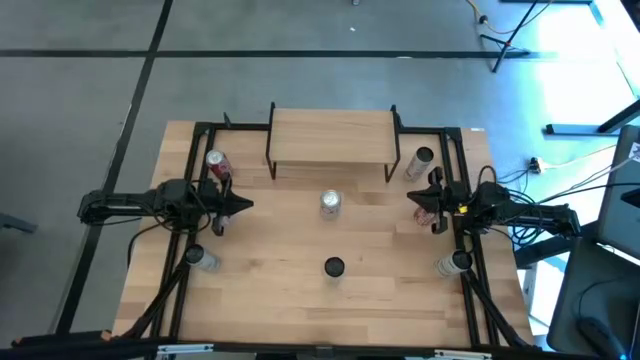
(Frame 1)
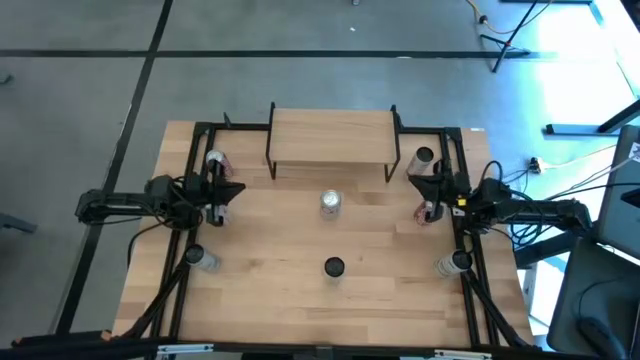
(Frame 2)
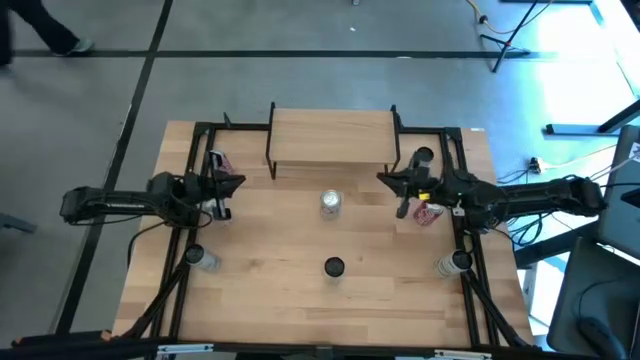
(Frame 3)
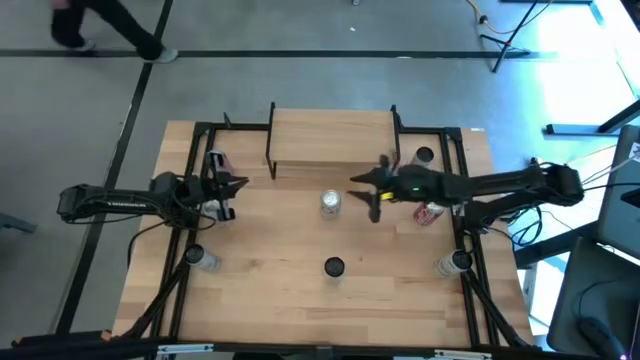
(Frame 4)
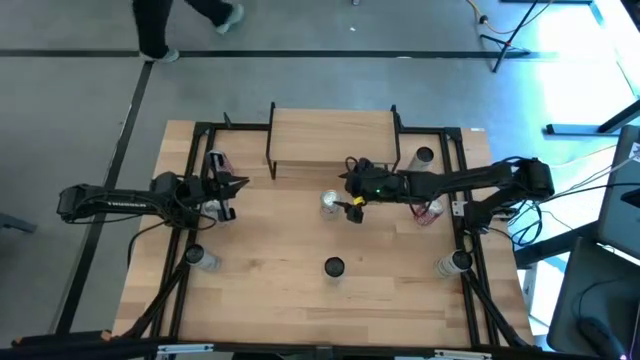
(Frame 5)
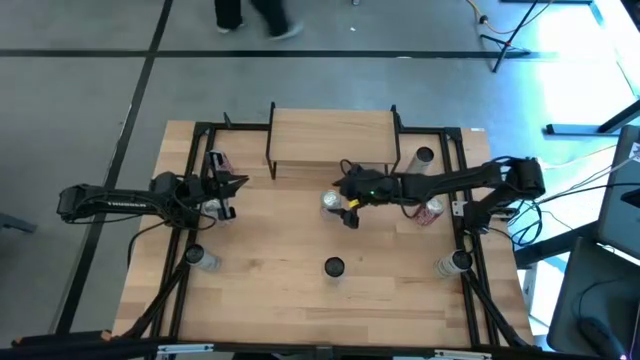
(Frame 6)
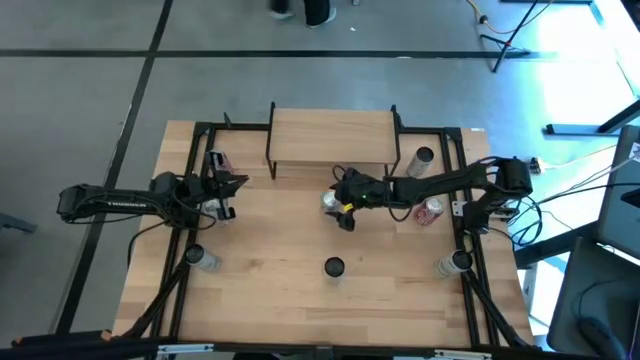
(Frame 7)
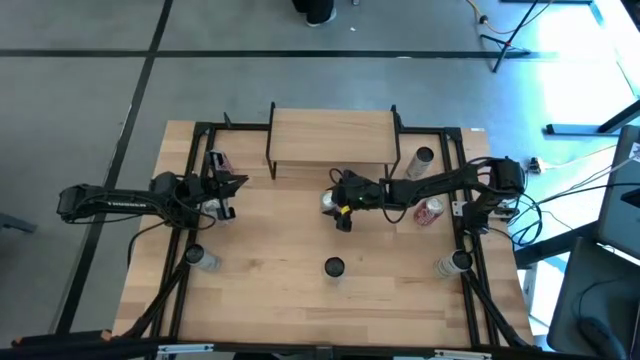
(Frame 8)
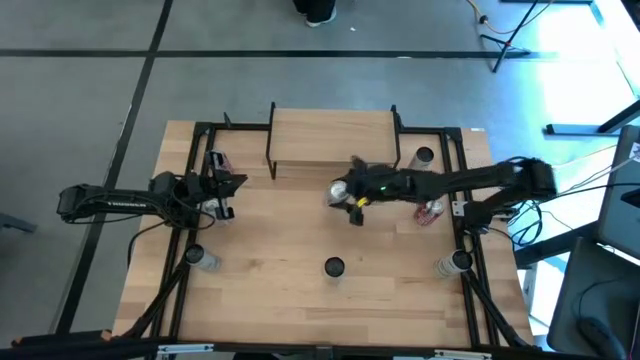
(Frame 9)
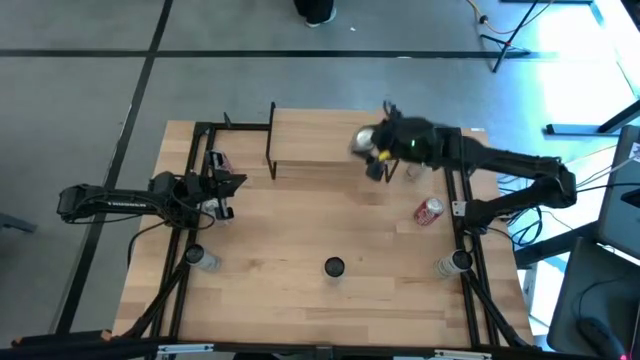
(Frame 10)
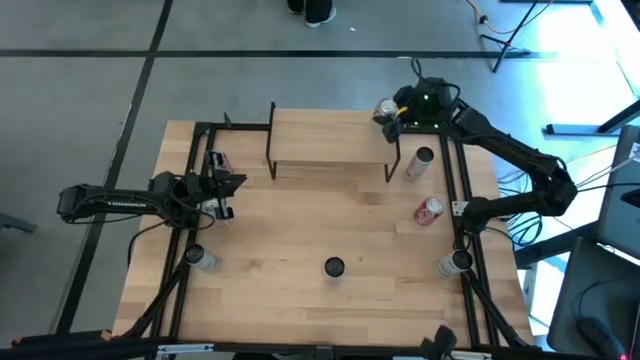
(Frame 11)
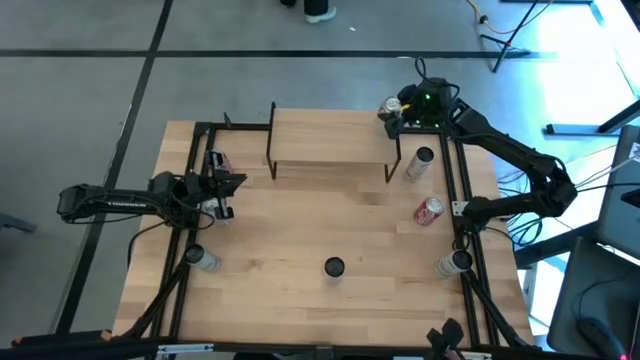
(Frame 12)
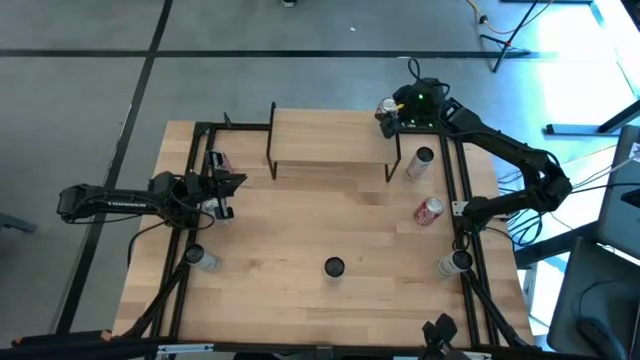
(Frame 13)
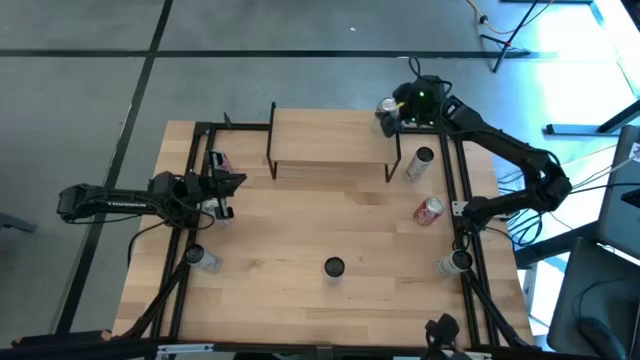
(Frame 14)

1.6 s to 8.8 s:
Task: Place canned beverage on shelf
Put the right red-silver soda can on the shelf

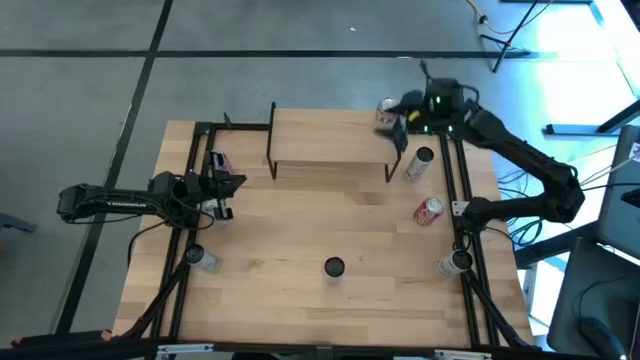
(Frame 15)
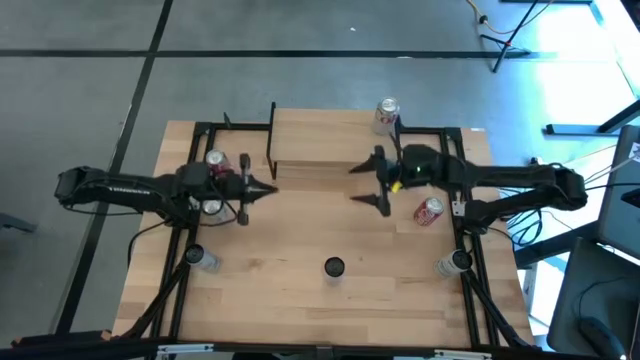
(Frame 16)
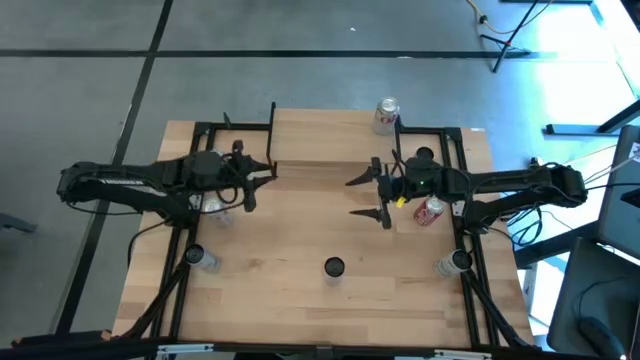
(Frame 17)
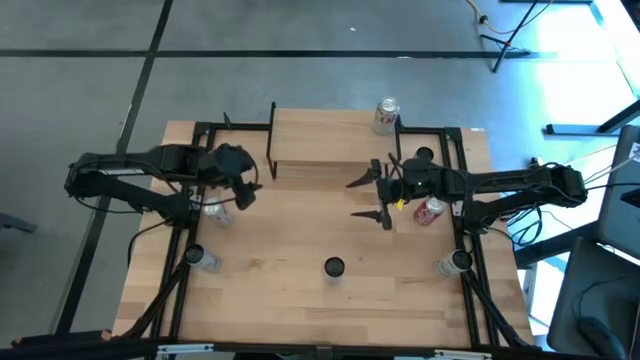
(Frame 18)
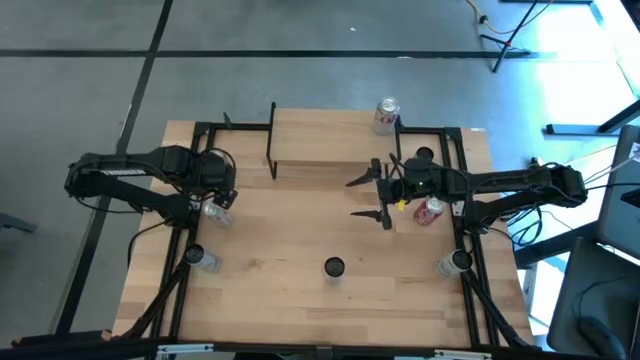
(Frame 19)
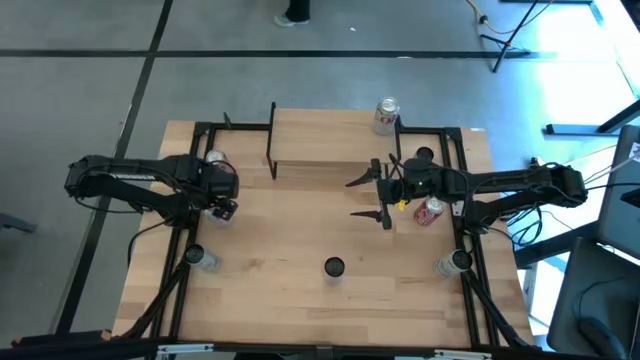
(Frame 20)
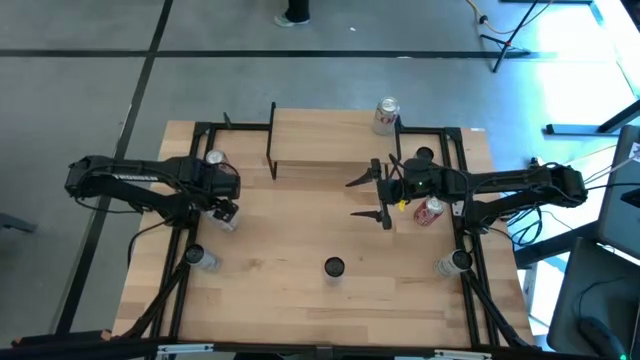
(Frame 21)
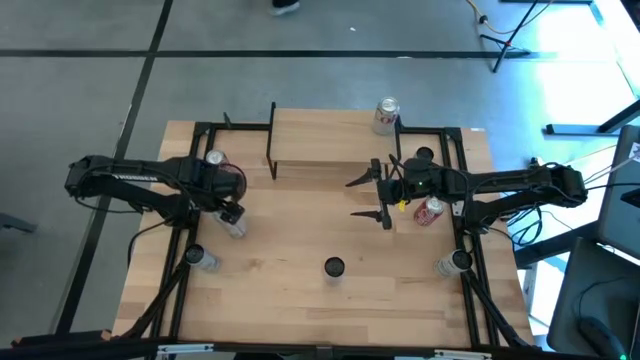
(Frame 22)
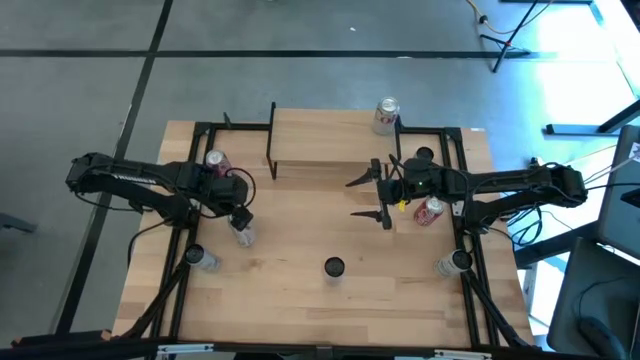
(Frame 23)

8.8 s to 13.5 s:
Put the red-silver soda can on the shelf aligned with the other red-silver soda can

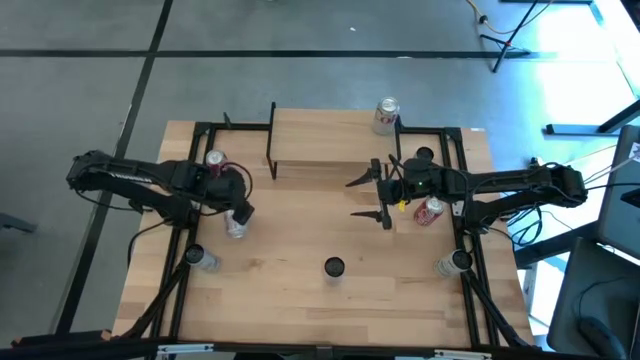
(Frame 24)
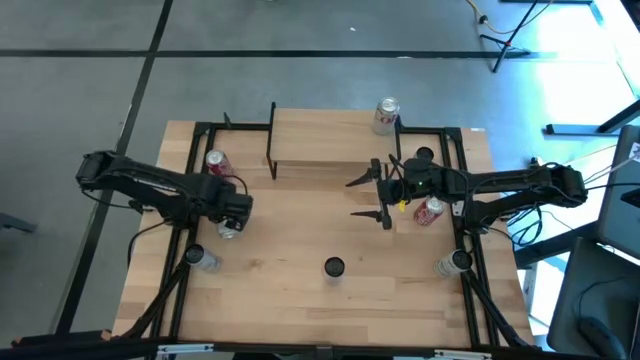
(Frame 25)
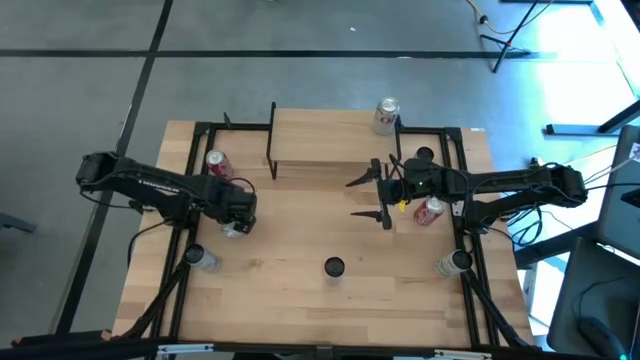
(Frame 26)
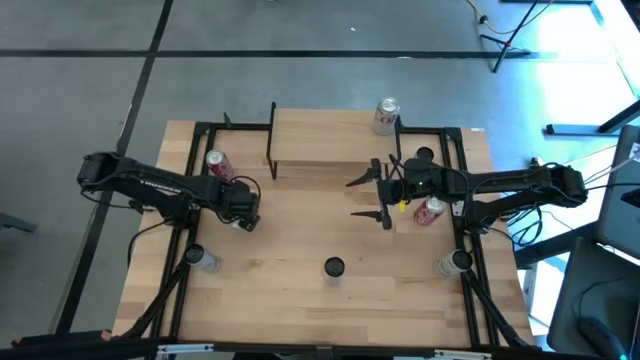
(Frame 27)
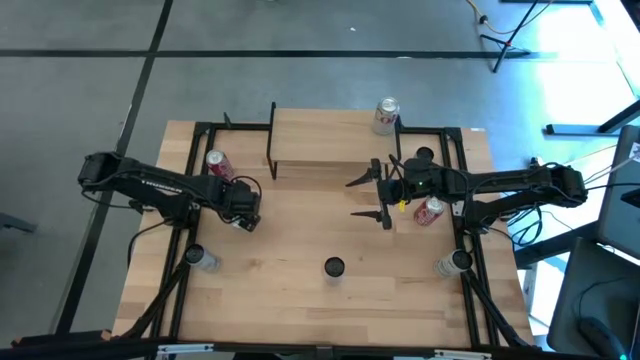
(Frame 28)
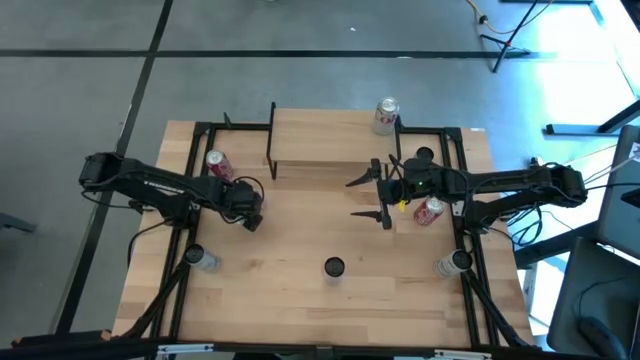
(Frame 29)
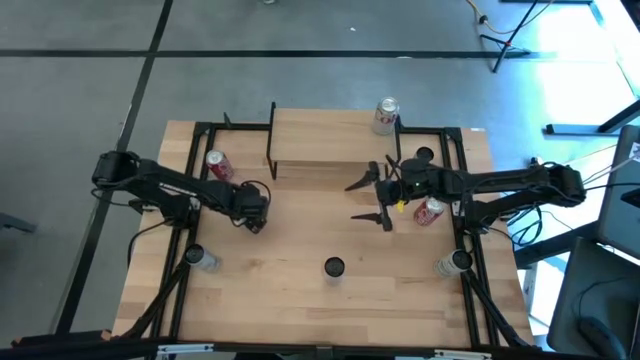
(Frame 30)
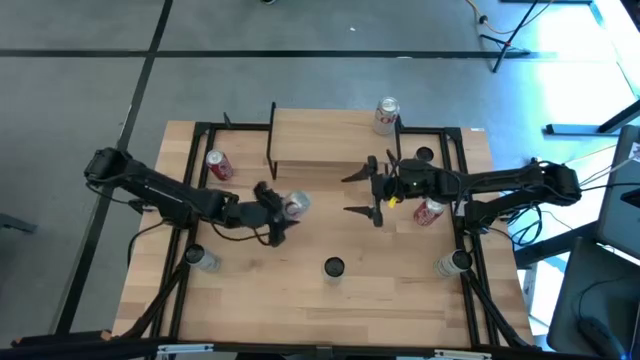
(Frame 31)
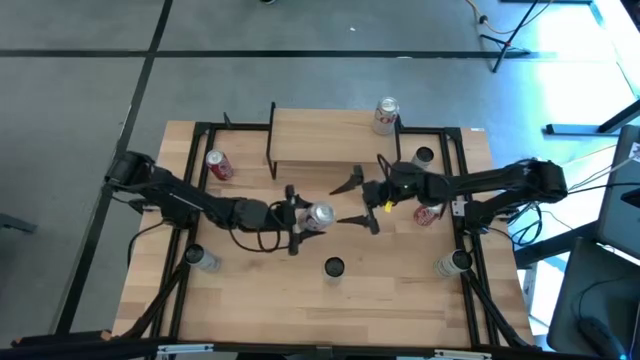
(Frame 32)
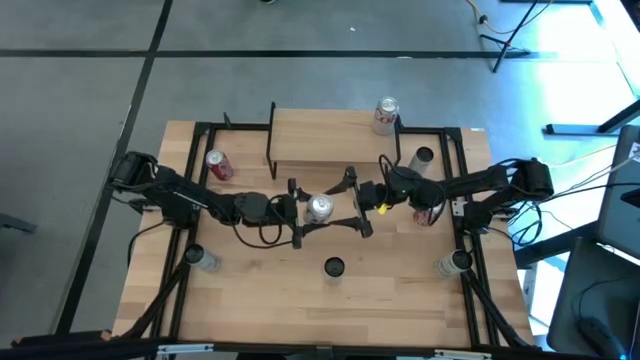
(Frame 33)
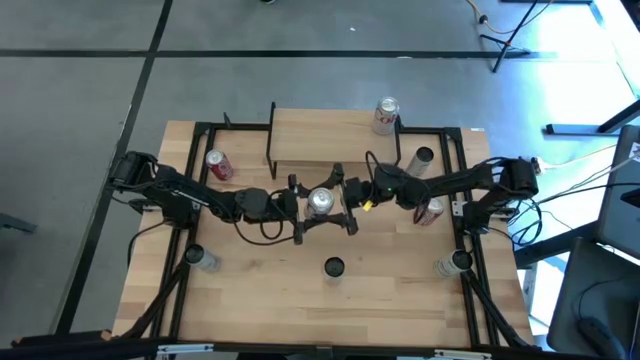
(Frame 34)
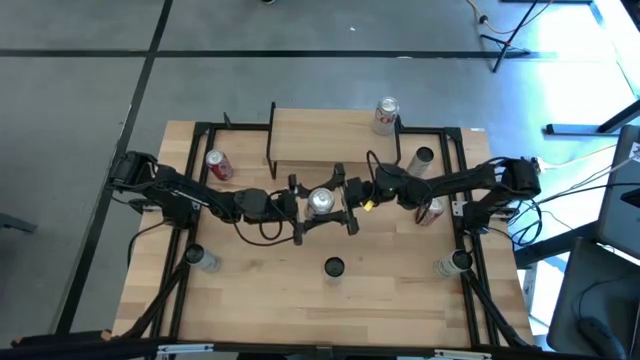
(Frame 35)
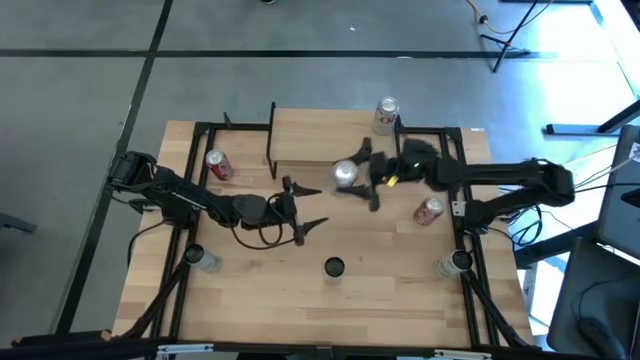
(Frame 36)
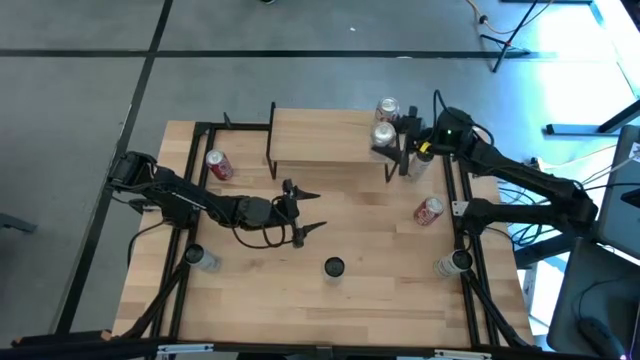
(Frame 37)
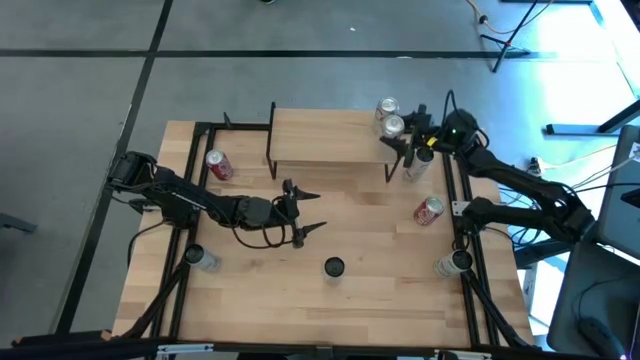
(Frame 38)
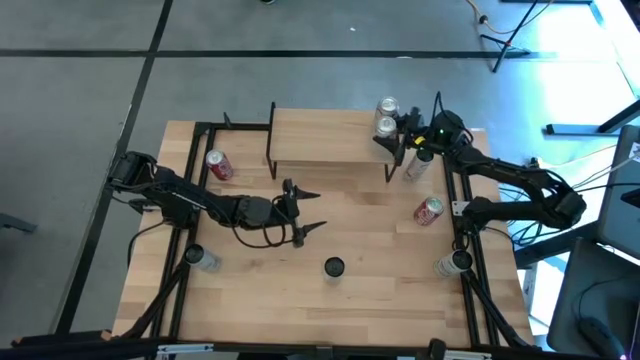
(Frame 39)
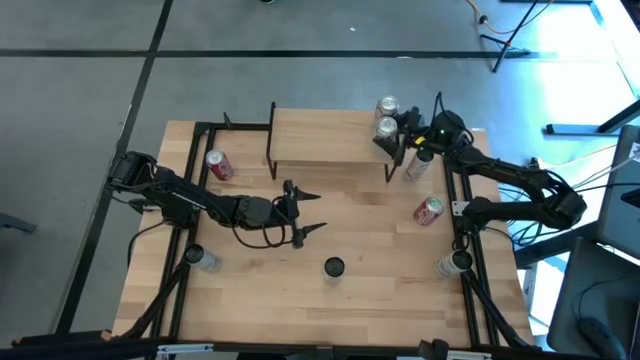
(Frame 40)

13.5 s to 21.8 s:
Put the red-silver soda can on the shelf aligned with the other red-silver soda can
